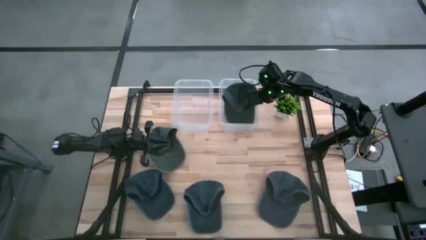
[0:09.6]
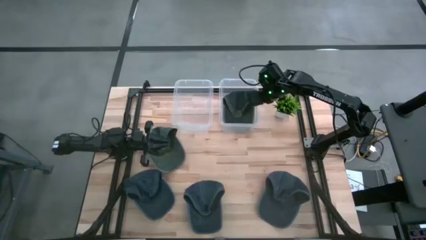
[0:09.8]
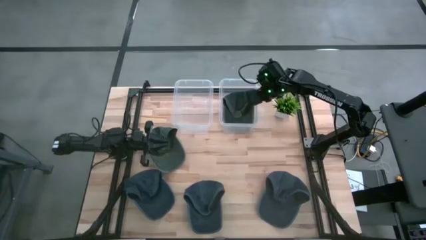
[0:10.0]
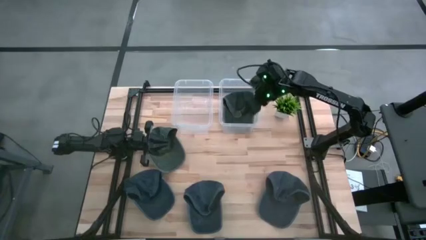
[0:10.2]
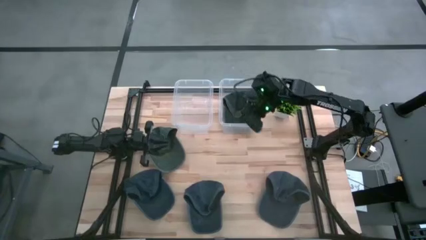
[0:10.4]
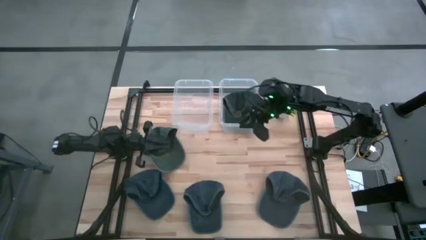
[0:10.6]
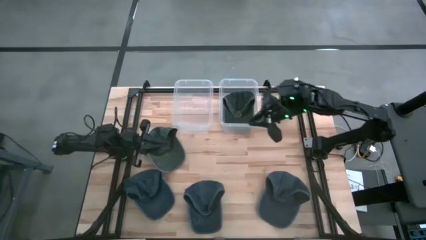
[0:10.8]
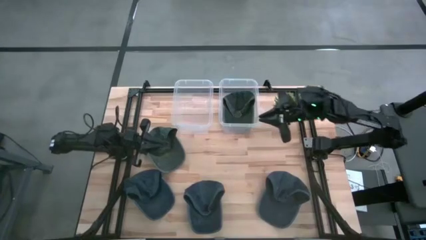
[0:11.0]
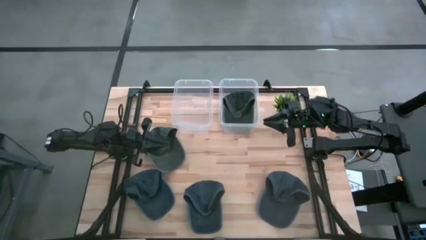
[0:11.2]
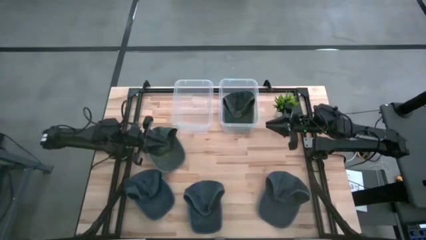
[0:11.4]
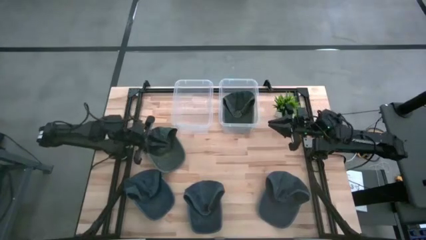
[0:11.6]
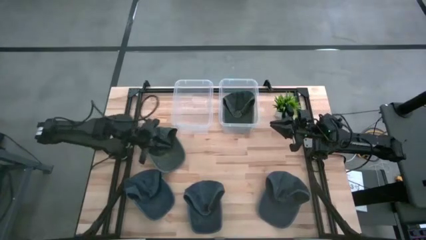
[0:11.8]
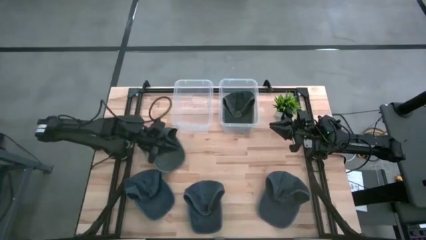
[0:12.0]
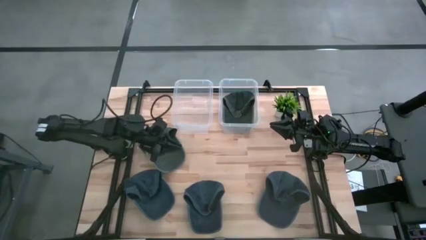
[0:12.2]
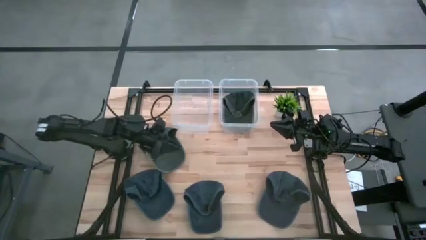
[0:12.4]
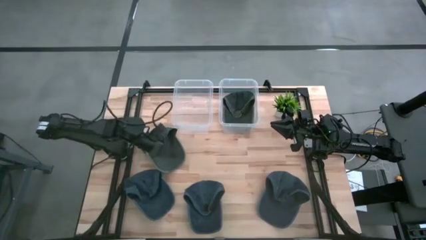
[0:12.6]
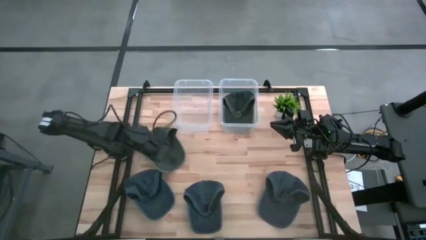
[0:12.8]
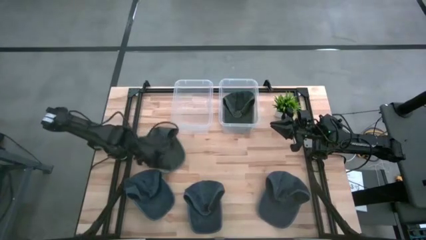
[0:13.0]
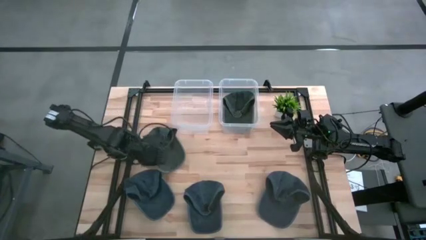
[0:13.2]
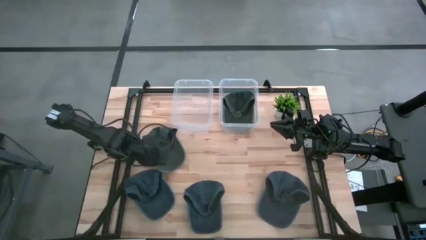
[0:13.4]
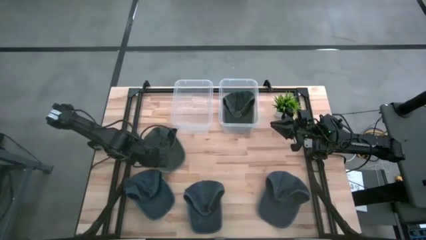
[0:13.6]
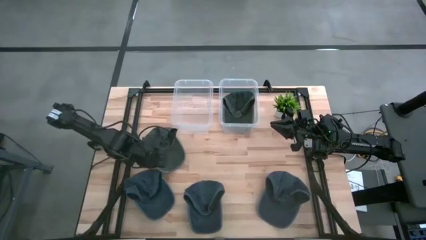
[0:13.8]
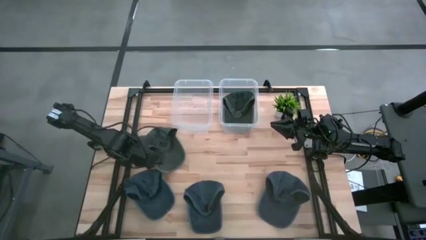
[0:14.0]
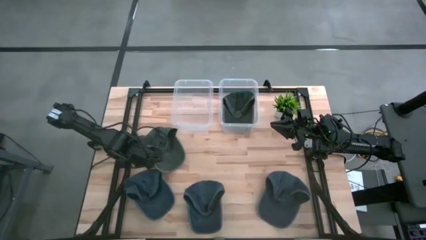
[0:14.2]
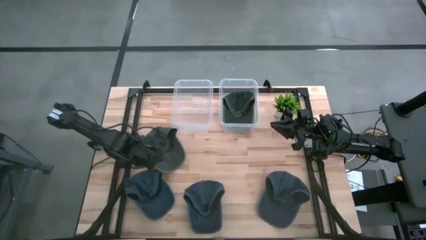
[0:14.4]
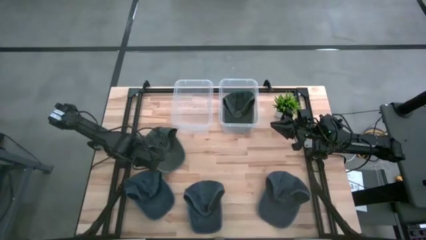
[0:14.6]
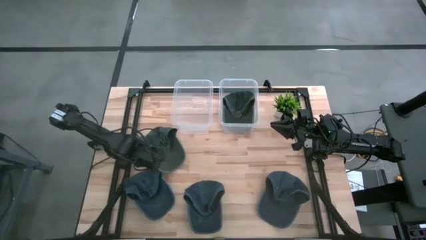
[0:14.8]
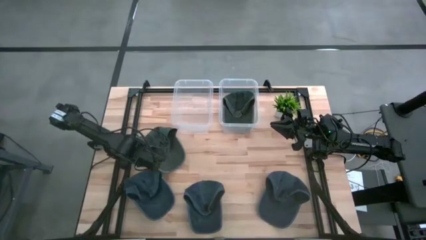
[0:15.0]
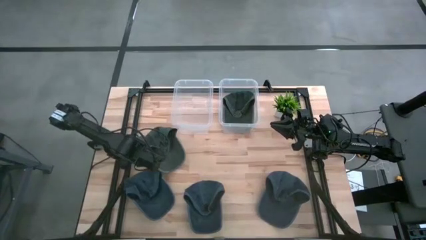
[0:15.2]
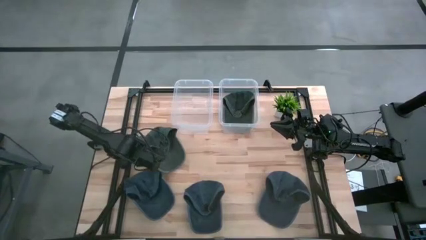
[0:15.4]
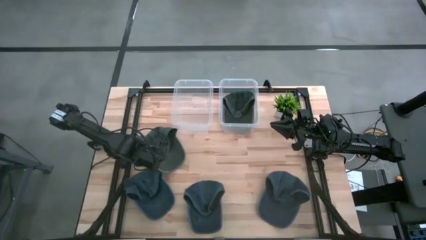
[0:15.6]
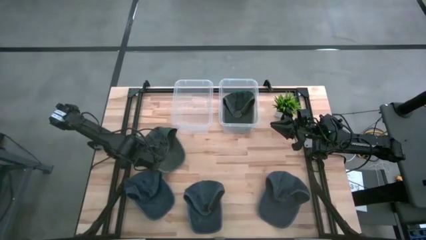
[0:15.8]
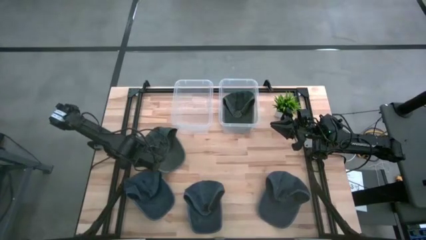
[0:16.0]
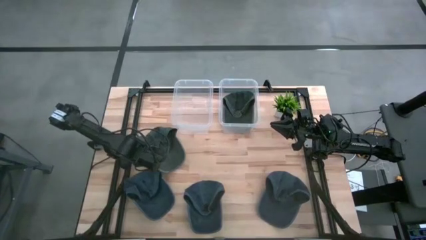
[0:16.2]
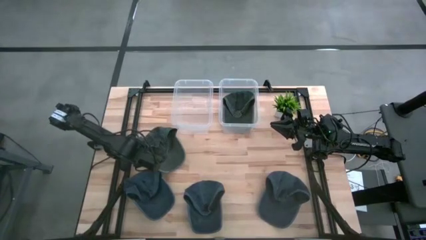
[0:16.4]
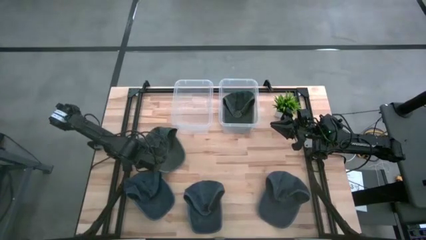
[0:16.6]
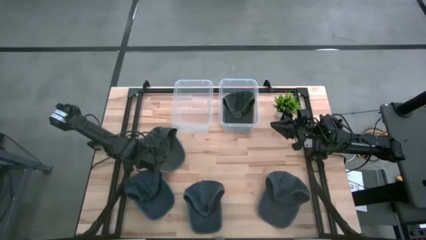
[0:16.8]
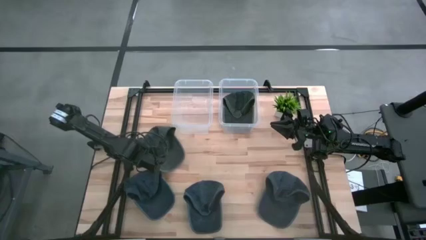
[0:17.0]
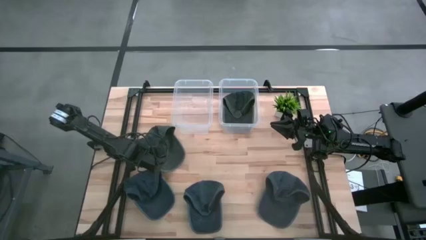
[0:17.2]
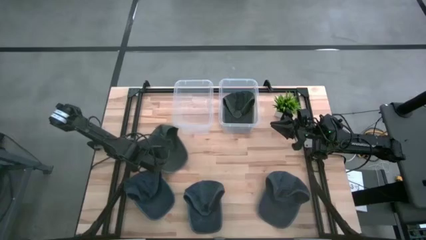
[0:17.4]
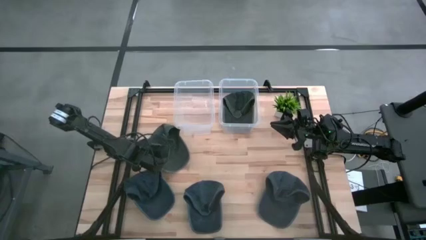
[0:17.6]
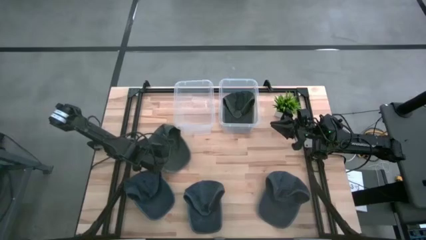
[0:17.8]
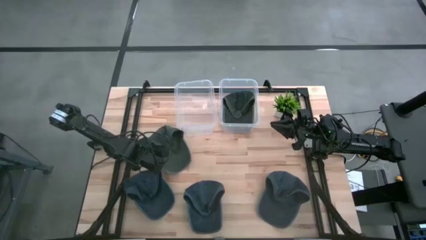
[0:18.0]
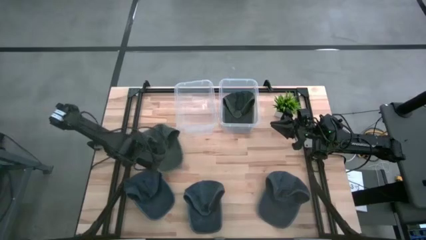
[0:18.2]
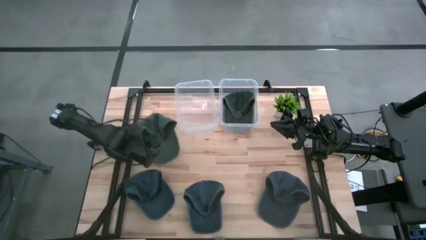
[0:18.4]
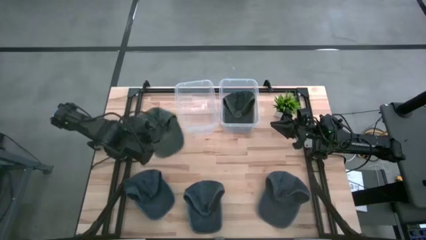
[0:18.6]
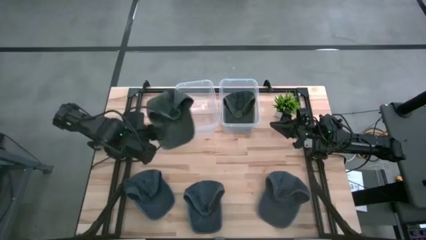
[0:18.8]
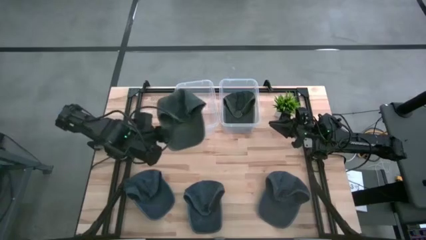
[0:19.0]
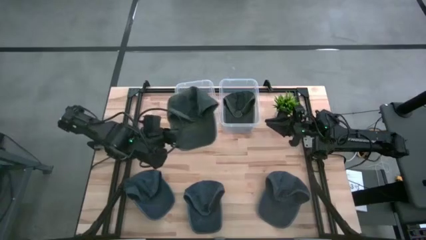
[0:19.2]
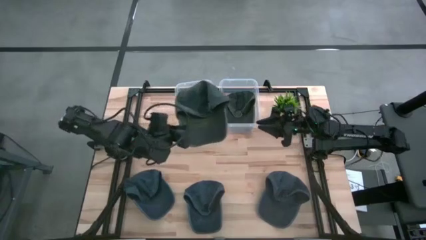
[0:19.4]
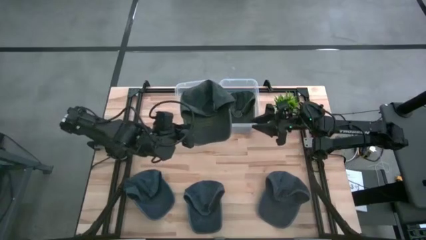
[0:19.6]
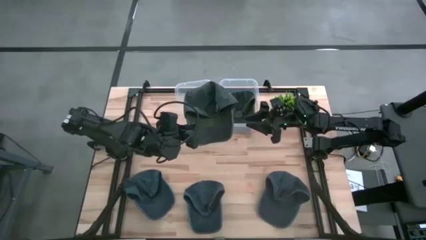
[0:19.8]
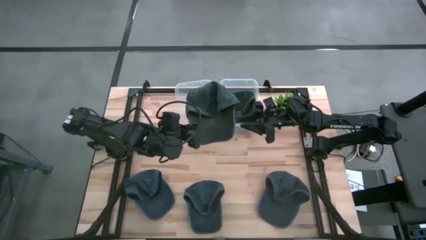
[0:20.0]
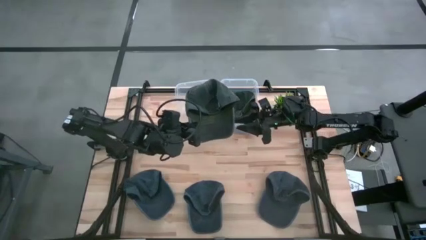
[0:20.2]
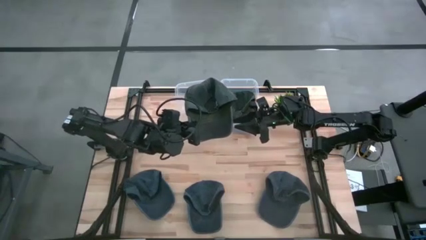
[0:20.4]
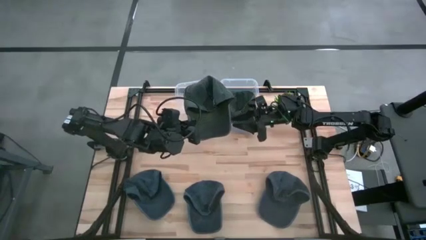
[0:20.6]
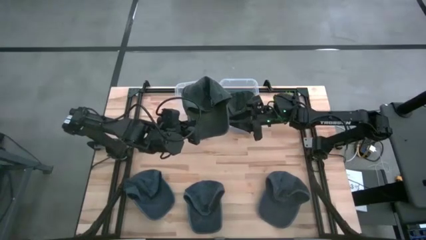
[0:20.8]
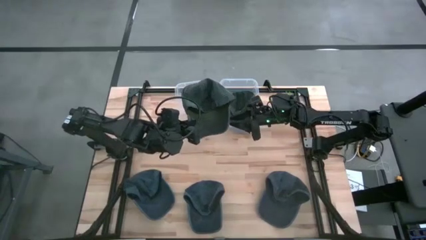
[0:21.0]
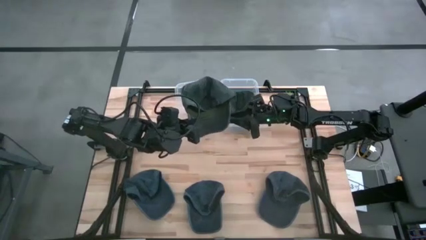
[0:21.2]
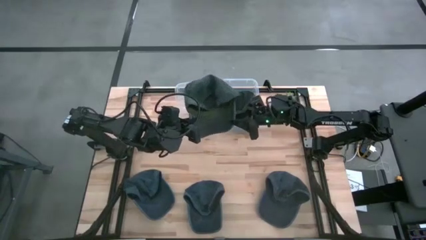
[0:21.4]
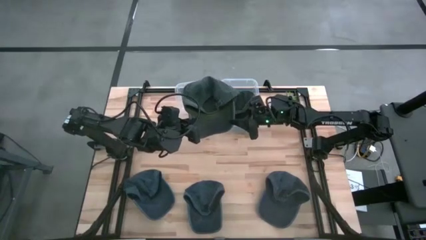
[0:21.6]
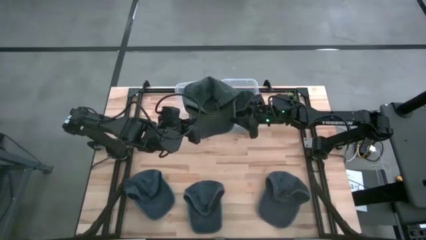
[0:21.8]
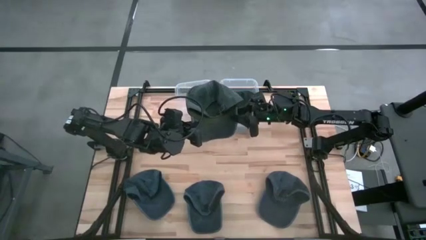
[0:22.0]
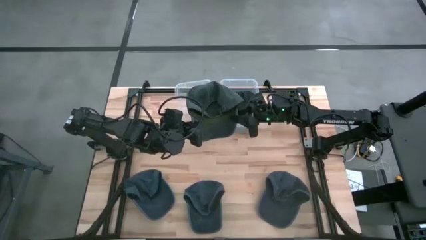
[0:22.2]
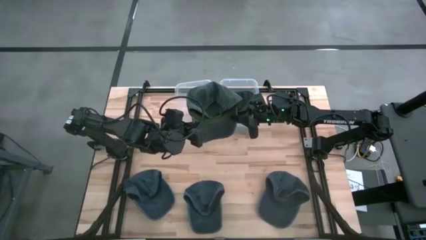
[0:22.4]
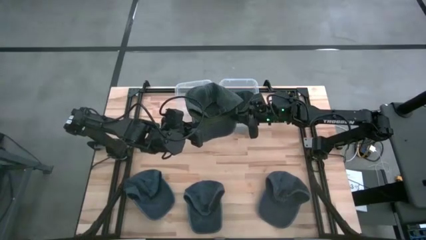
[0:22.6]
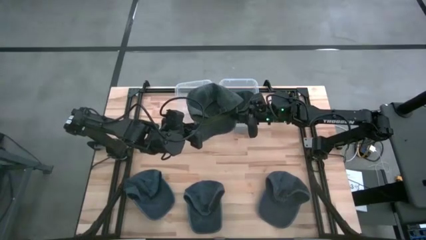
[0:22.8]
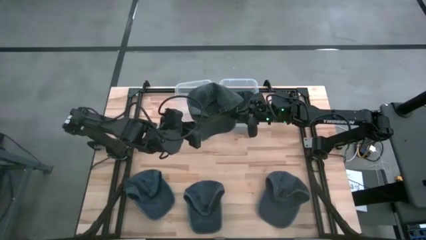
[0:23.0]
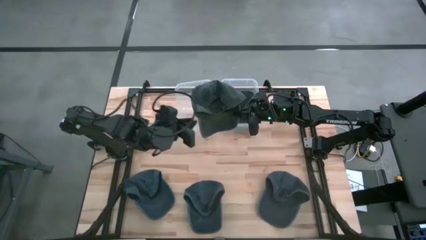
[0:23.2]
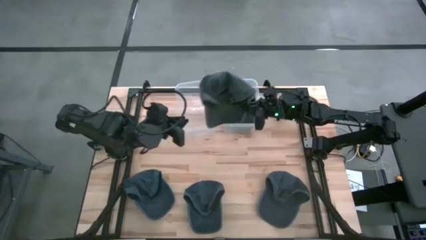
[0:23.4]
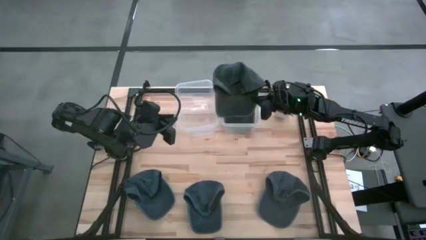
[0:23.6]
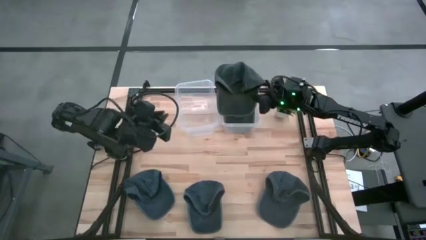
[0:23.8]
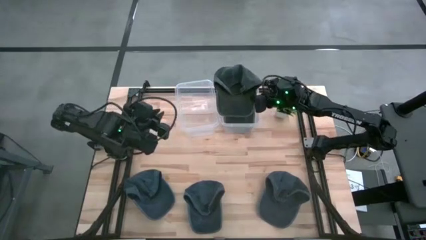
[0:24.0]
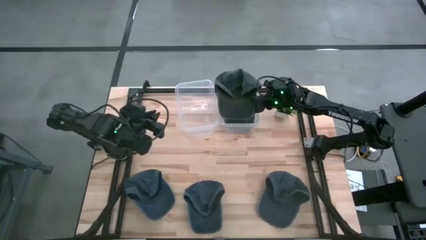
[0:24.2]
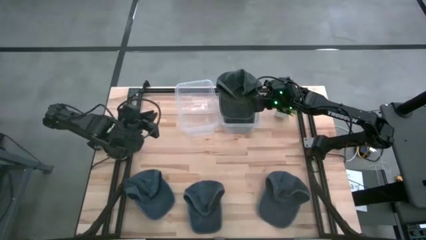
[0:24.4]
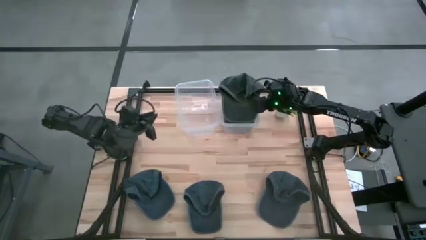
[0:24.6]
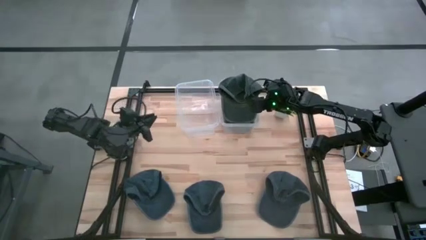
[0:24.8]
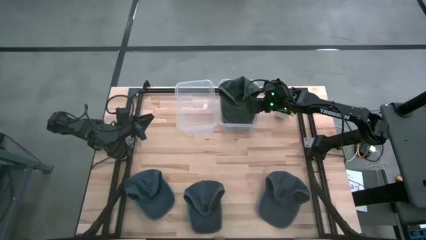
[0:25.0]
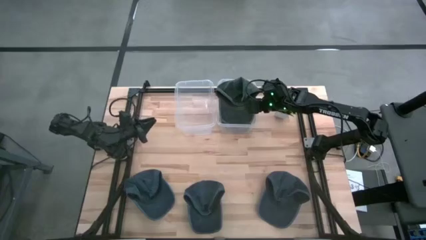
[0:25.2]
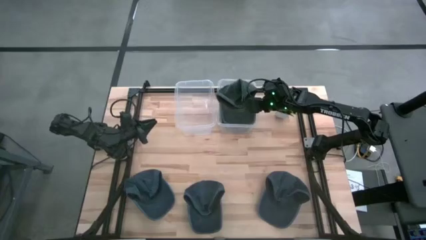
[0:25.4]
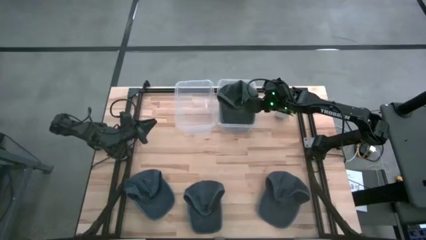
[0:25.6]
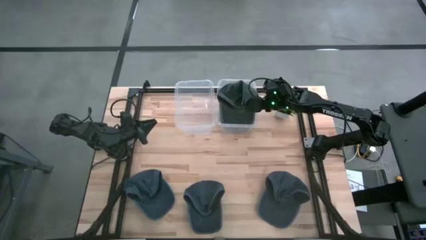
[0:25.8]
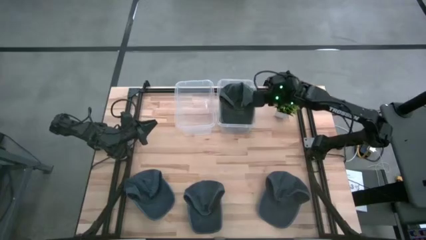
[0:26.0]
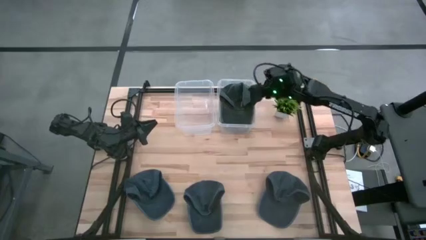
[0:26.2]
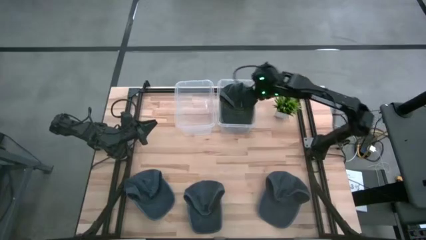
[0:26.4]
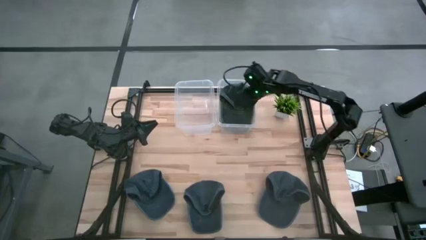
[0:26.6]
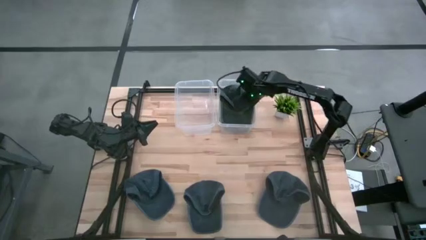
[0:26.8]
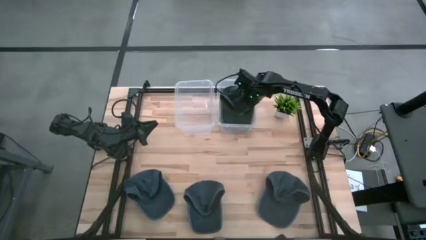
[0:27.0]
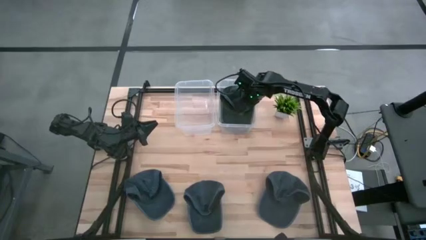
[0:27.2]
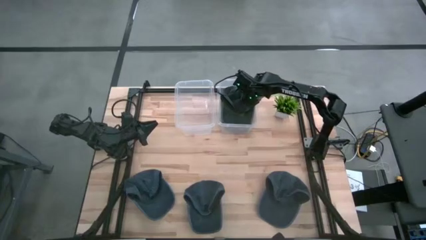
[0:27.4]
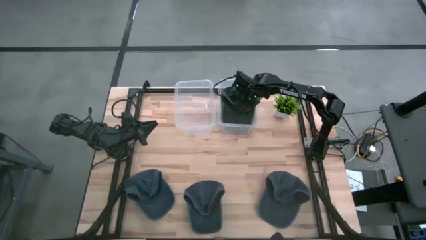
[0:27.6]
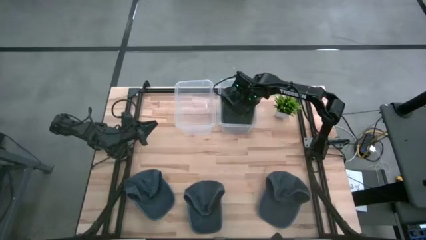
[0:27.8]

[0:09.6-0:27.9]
Task: Pick & Place hat
Put the gray cap into the right transparent bin
